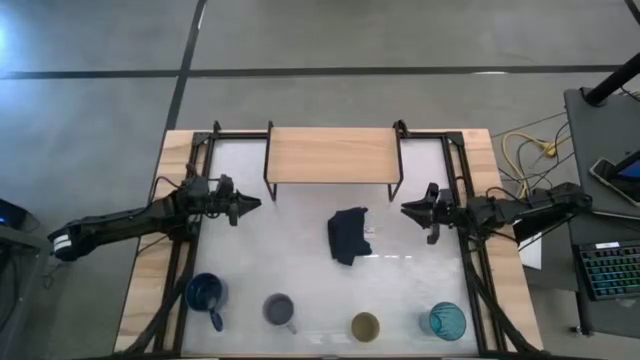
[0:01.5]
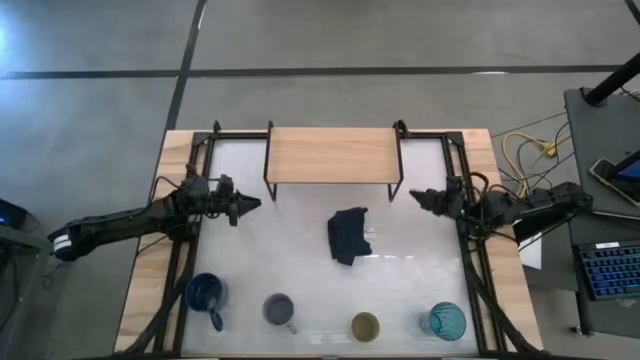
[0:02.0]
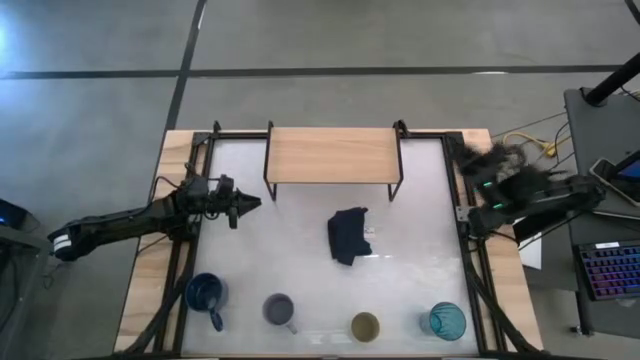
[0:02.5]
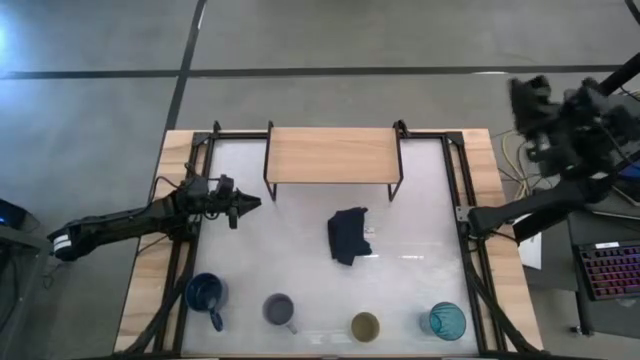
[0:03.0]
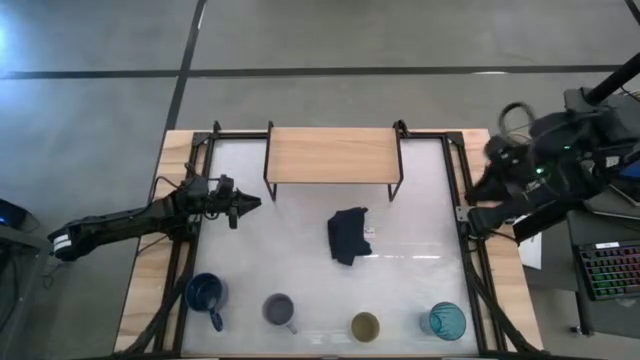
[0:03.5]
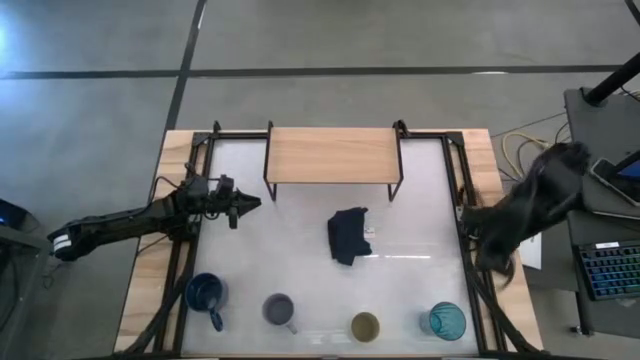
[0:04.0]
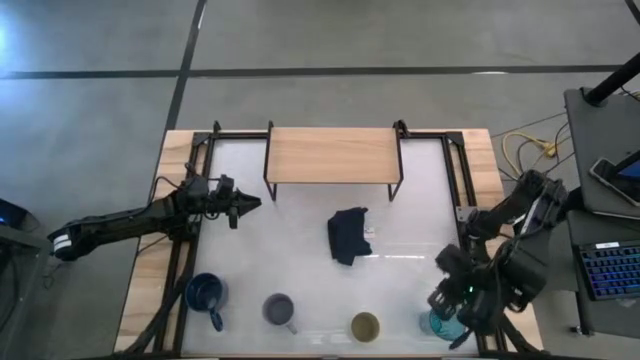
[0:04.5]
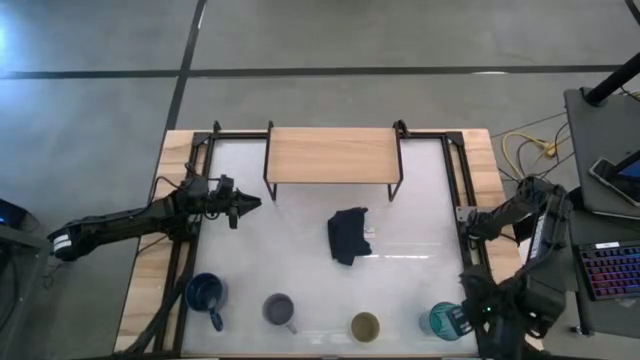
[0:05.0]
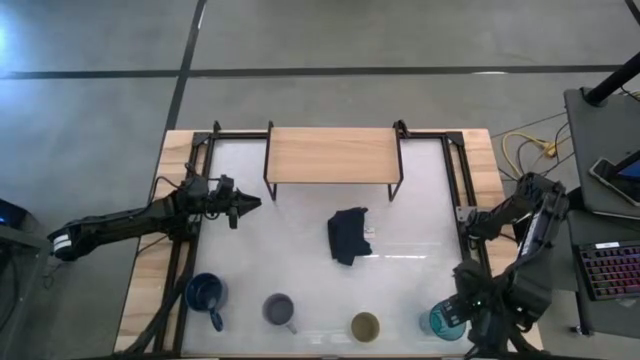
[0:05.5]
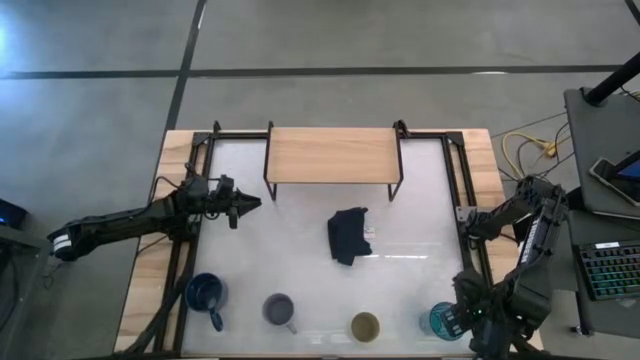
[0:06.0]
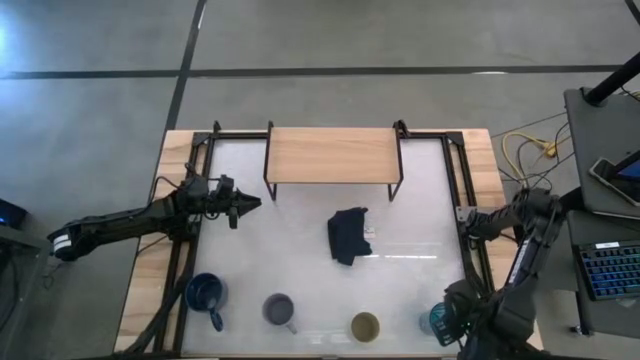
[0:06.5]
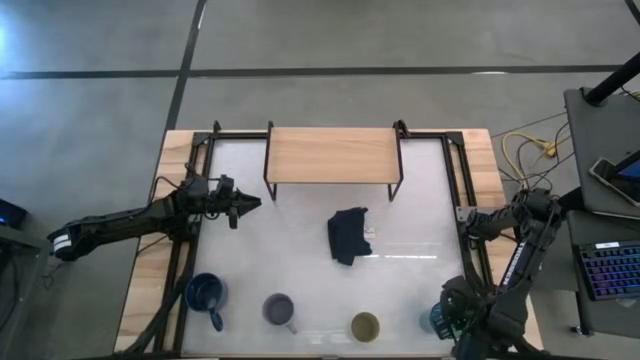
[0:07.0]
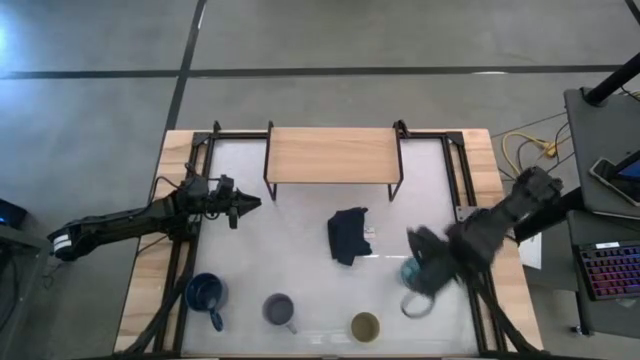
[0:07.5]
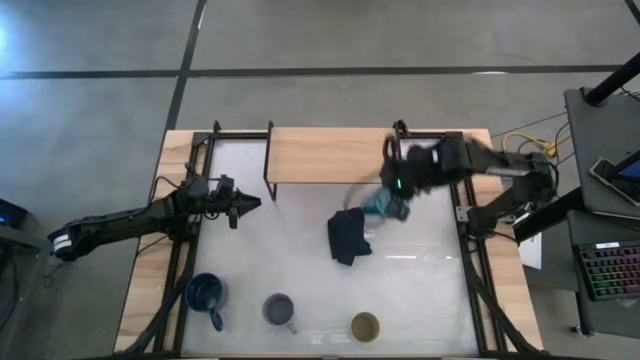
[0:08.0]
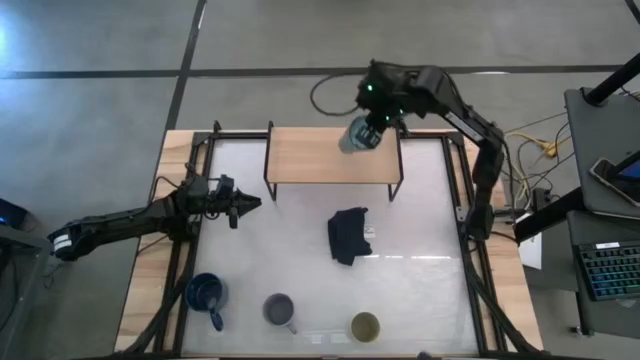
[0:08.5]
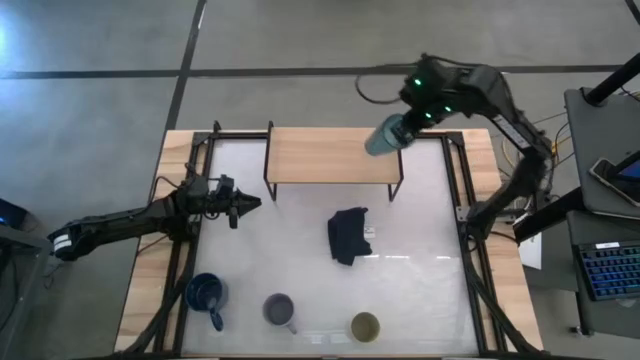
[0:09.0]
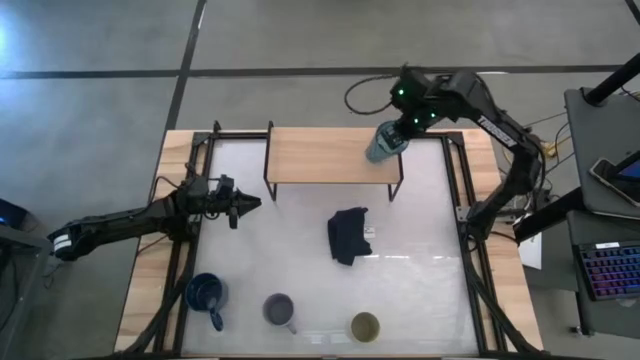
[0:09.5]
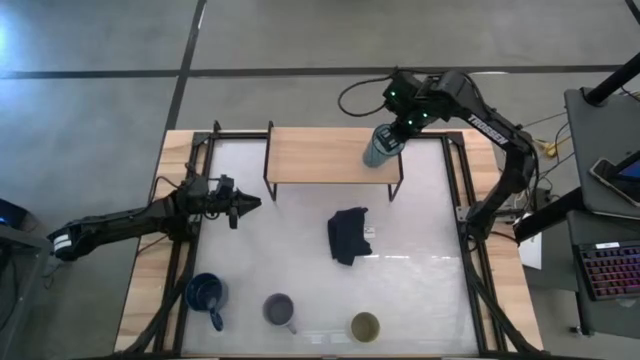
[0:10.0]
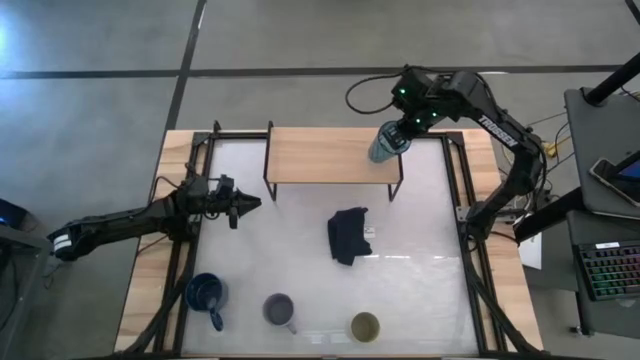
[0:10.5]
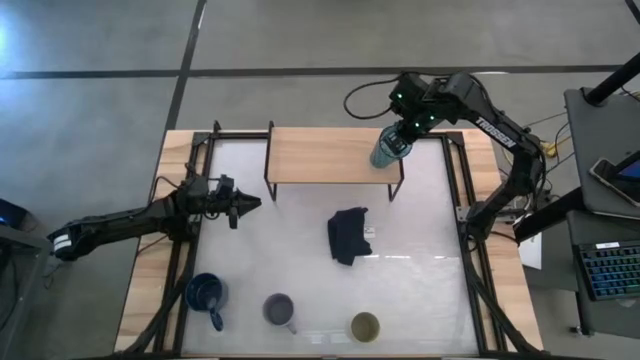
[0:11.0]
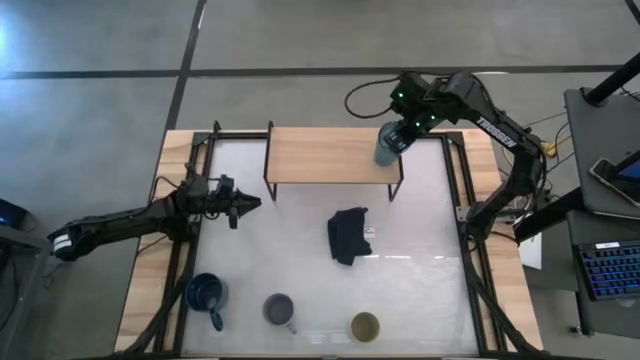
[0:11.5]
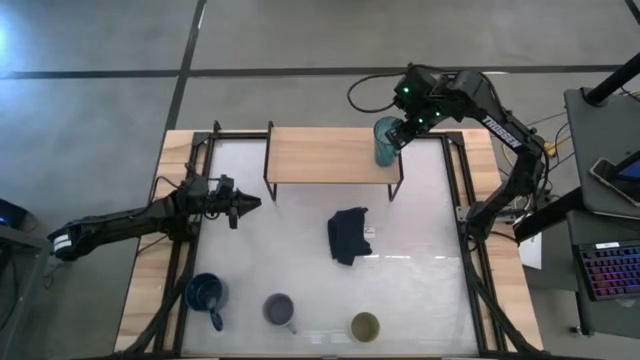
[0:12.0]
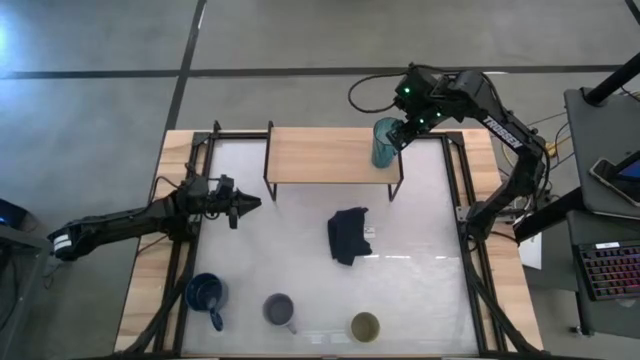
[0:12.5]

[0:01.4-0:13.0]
Task: Stack small to large cups/mugs on shelf
Put the blue cup on the shelf

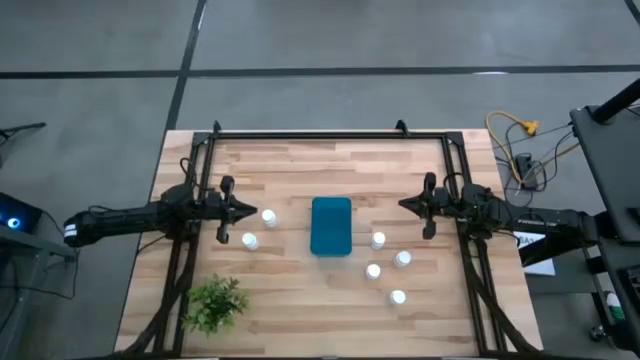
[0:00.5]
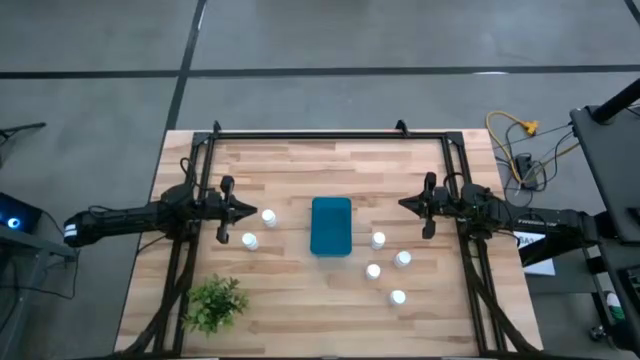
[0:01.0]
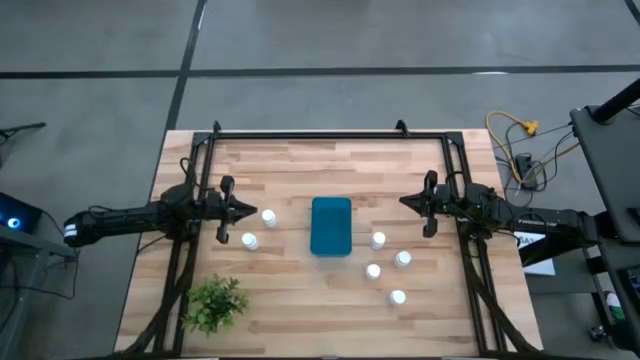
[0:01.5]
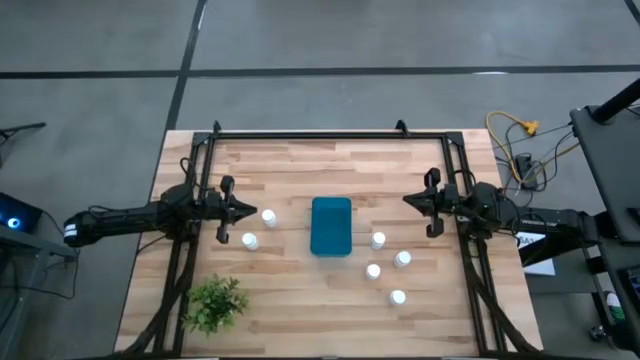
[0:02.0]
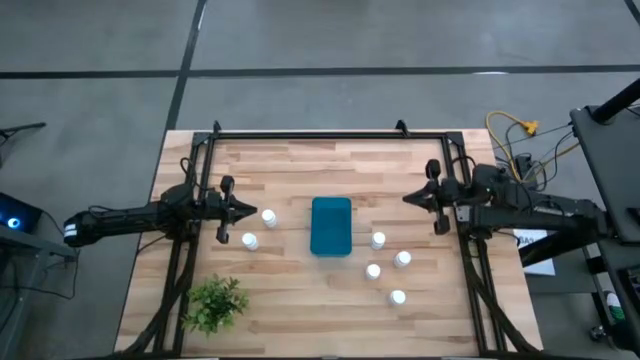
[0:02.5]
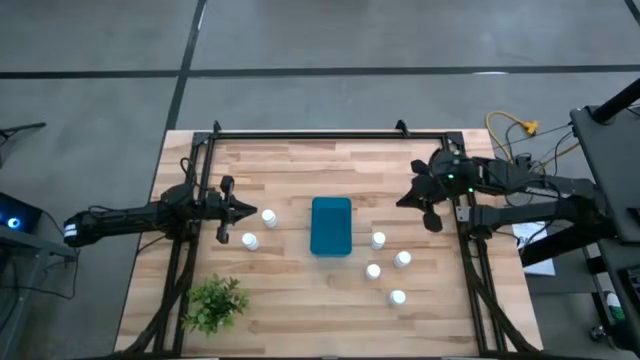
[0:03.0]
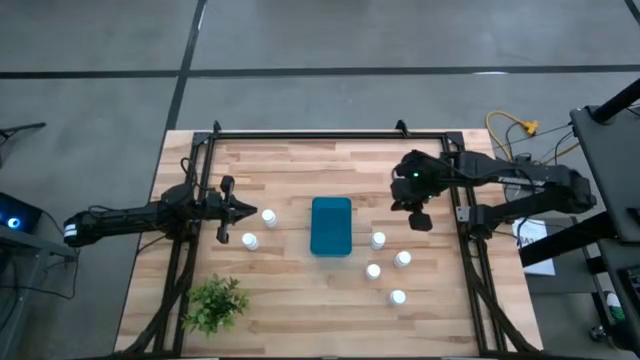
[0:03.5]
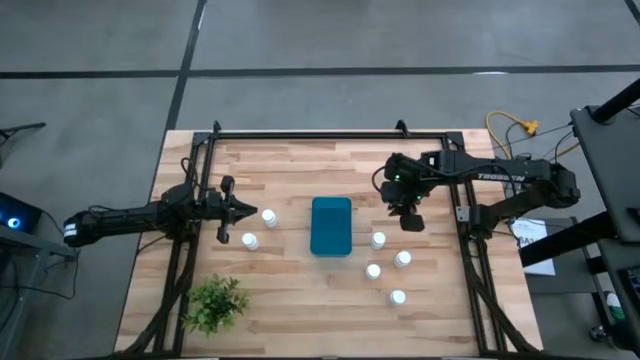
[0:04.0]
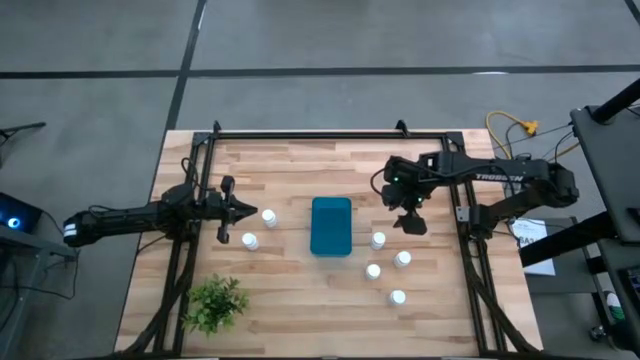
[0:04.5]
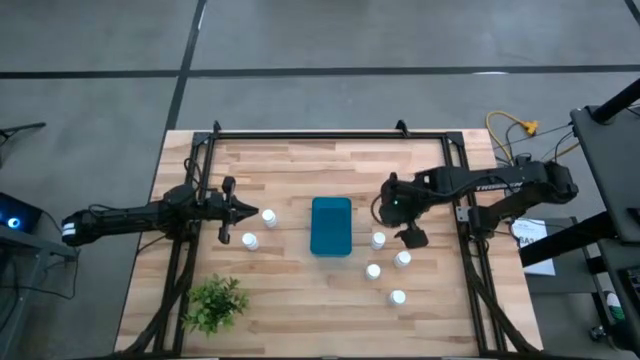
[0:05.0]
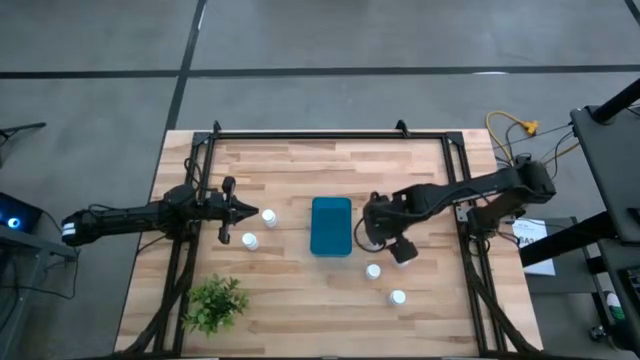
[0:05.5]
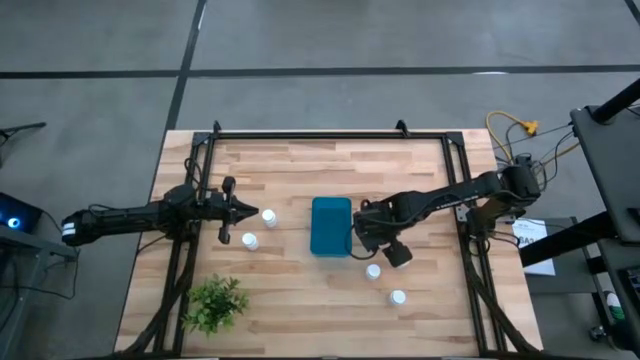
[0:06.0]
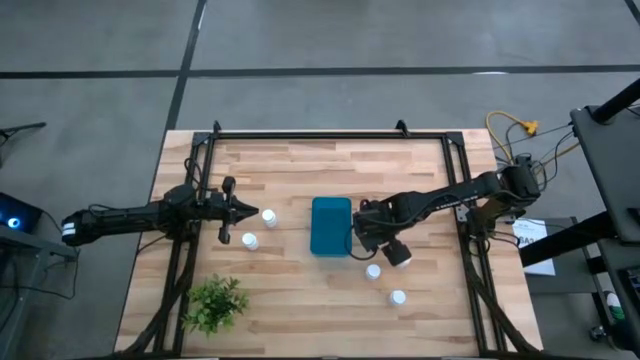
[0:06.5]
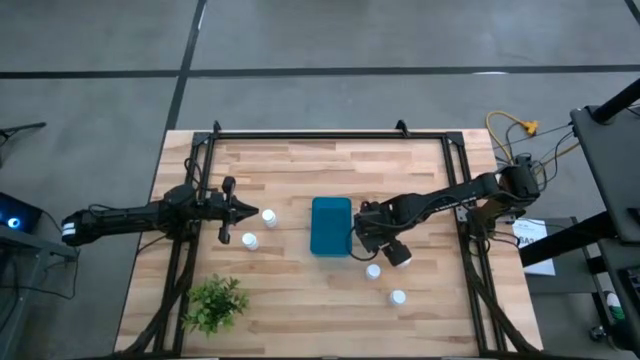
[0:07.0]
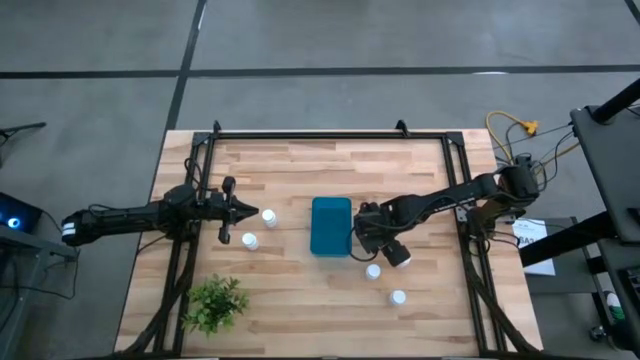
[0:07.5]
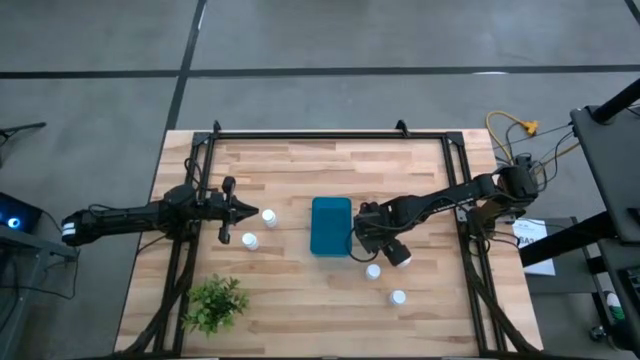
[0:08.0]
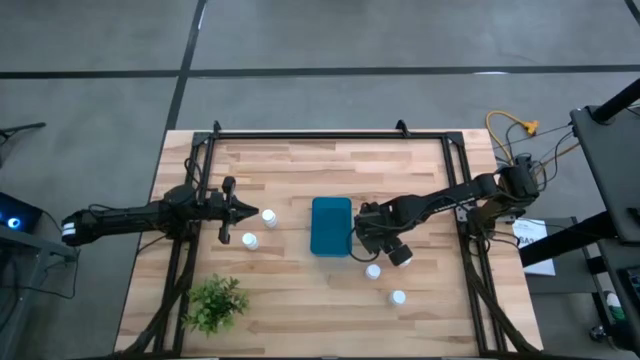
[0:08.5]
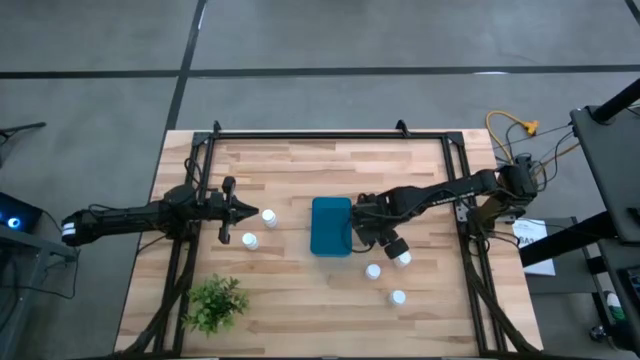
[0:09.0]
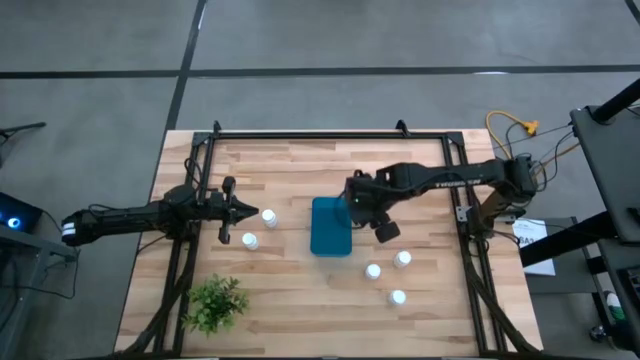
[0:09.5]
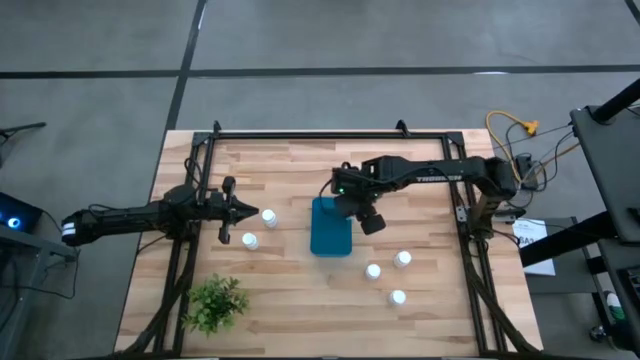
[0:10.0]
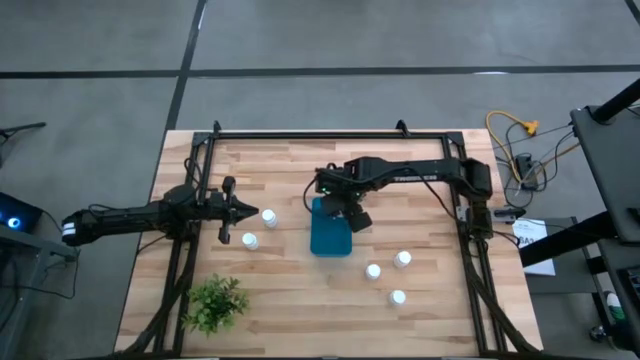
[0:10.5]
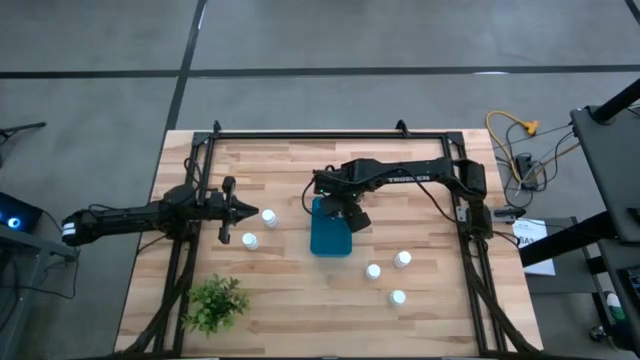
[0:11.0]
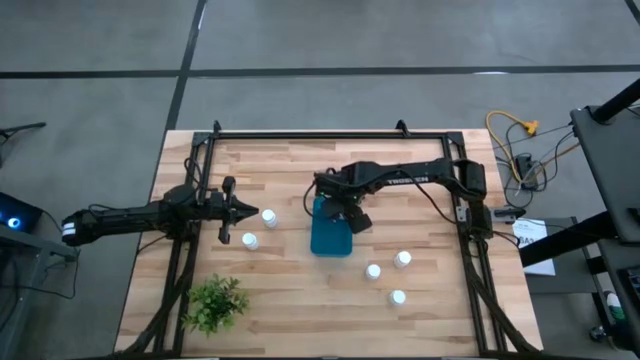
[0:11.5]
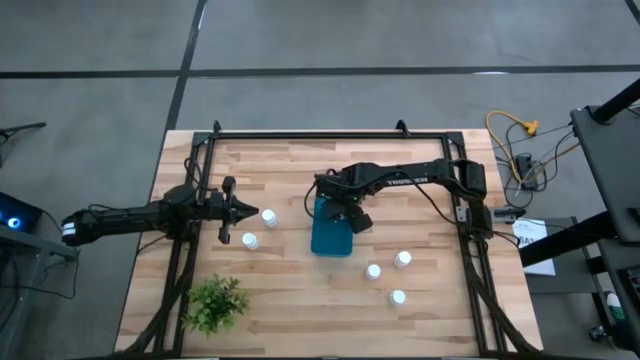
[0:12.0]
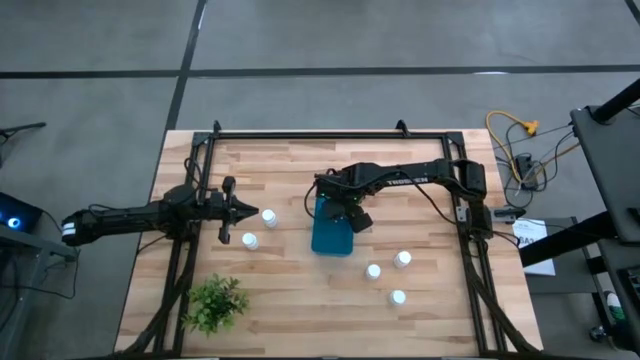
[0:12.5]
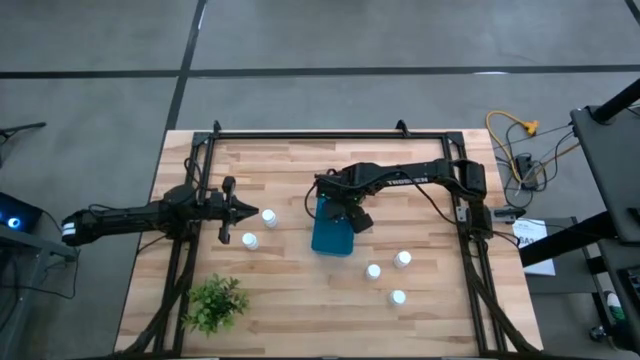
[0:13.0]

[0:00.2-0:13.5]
Task: Pick and place pill bottles into a basket
Put the medicine bottle into the blue bin
